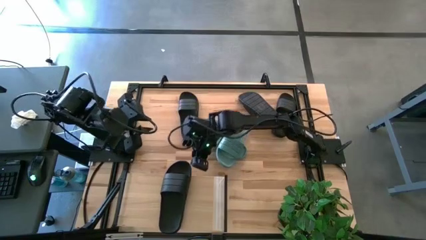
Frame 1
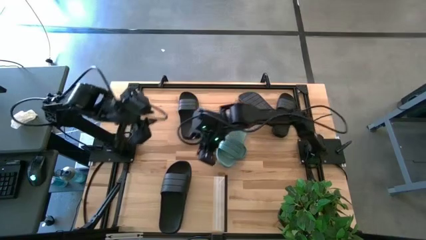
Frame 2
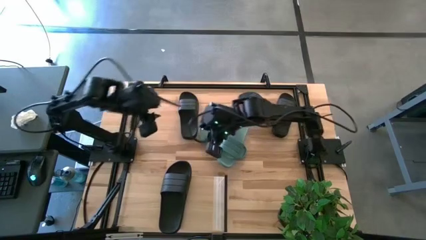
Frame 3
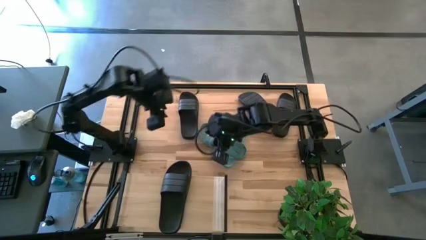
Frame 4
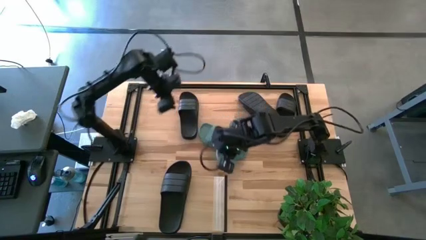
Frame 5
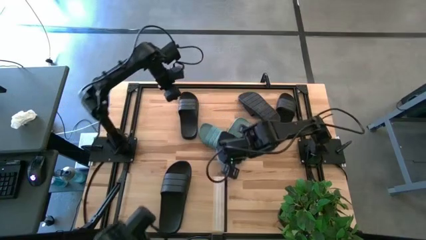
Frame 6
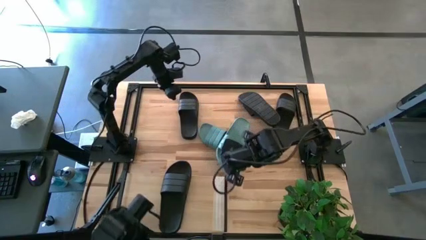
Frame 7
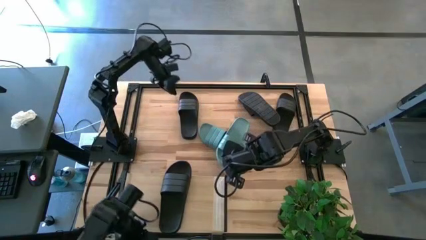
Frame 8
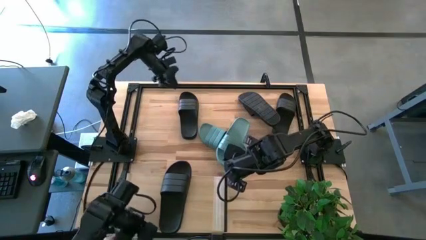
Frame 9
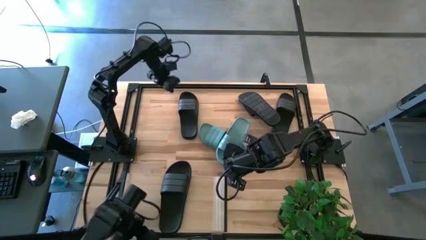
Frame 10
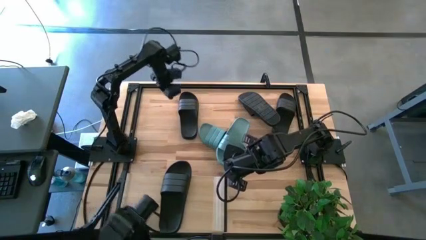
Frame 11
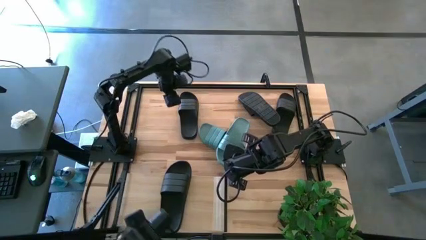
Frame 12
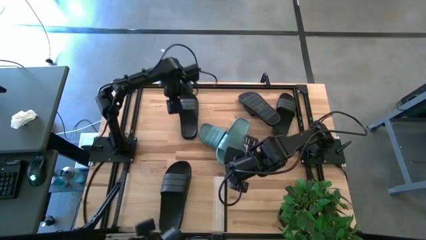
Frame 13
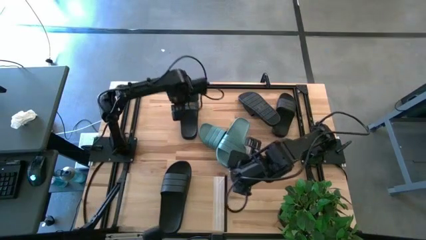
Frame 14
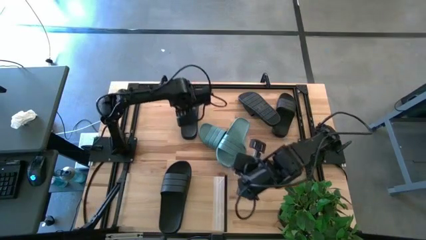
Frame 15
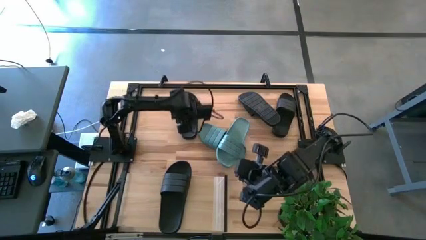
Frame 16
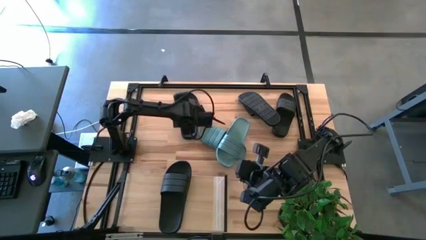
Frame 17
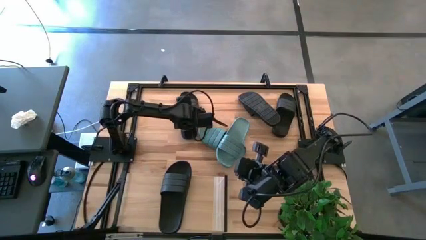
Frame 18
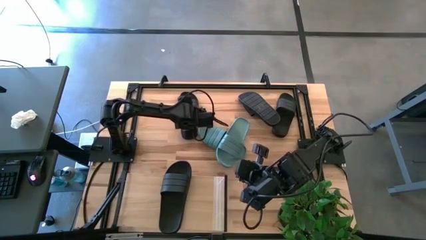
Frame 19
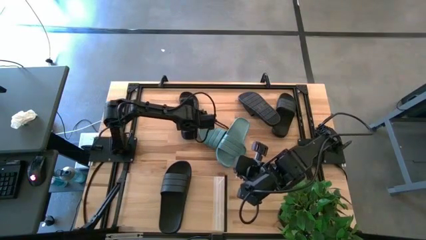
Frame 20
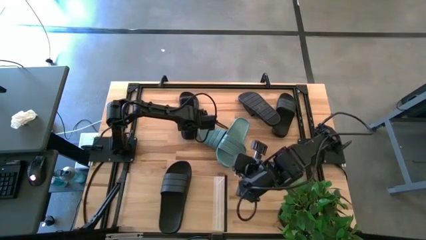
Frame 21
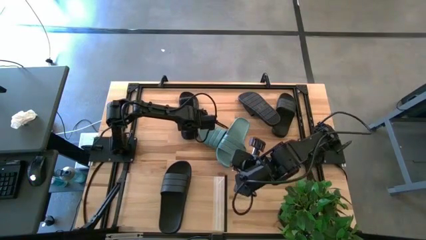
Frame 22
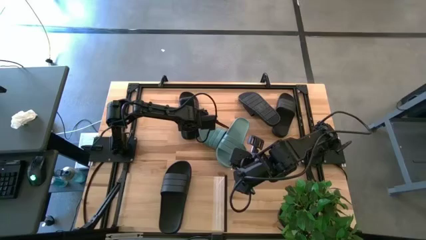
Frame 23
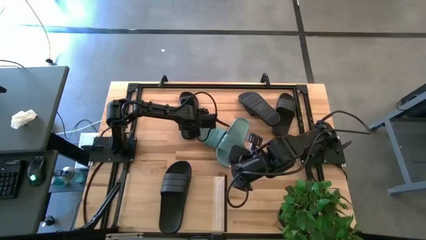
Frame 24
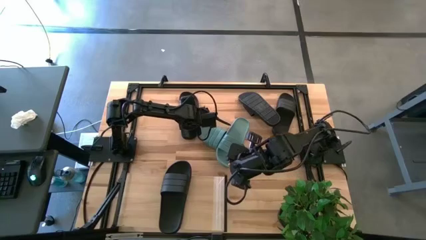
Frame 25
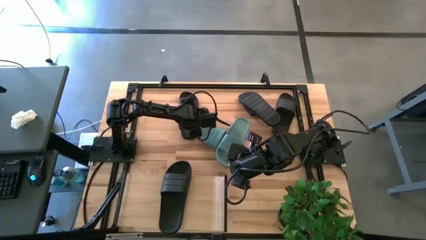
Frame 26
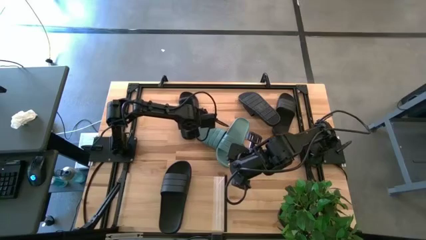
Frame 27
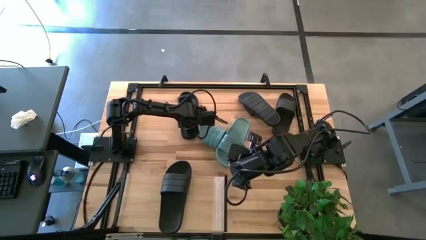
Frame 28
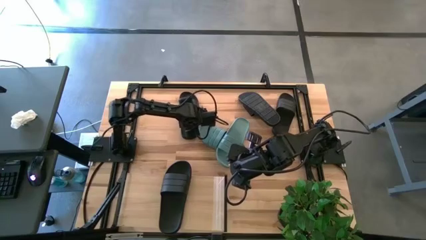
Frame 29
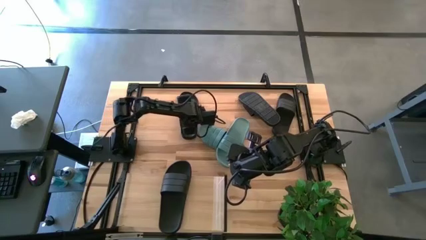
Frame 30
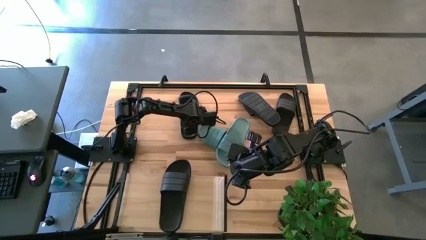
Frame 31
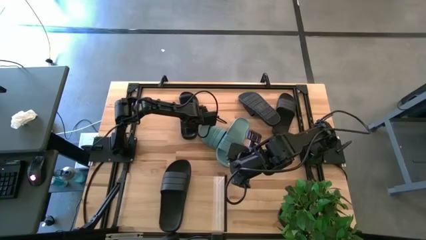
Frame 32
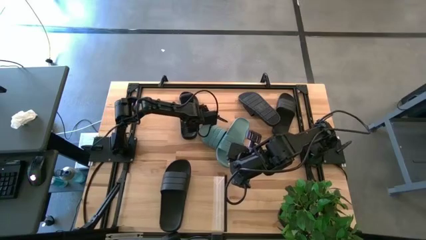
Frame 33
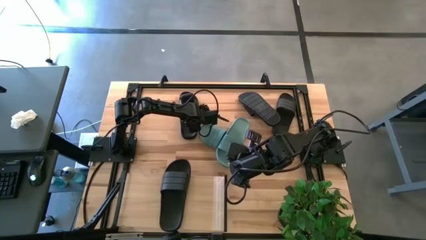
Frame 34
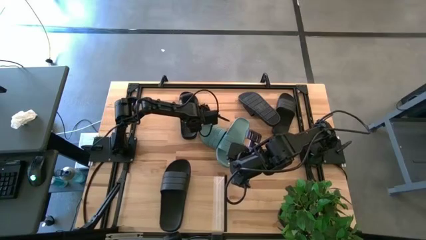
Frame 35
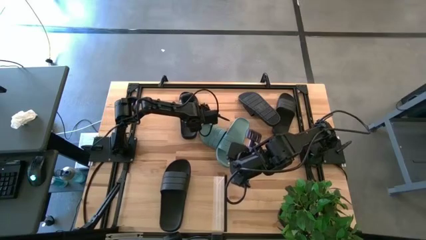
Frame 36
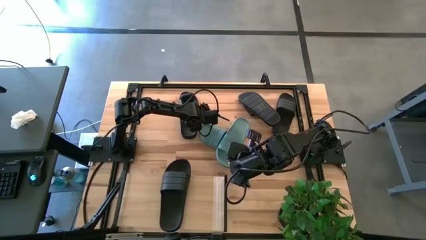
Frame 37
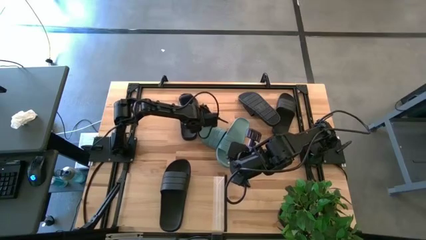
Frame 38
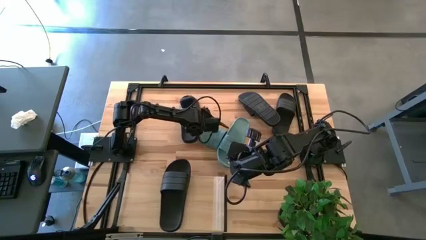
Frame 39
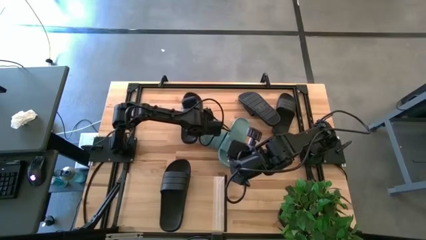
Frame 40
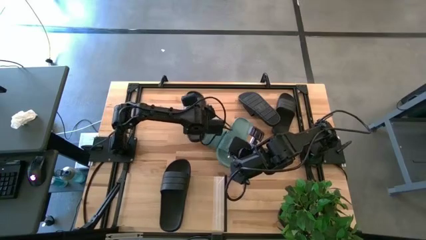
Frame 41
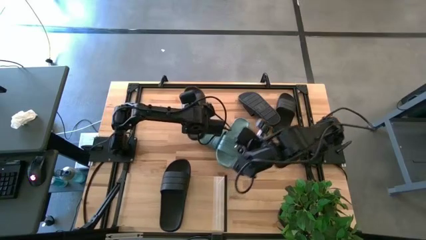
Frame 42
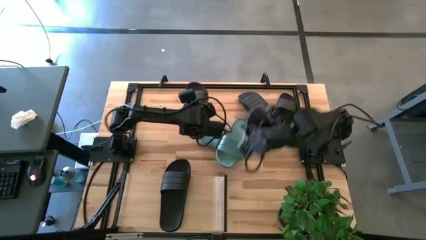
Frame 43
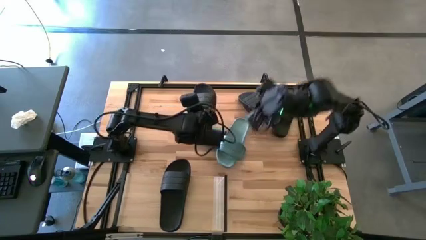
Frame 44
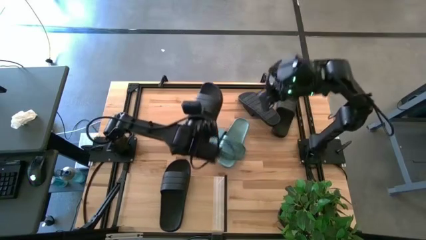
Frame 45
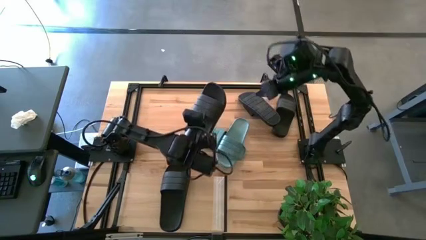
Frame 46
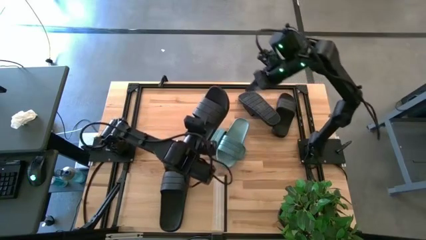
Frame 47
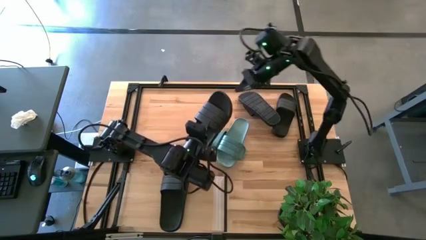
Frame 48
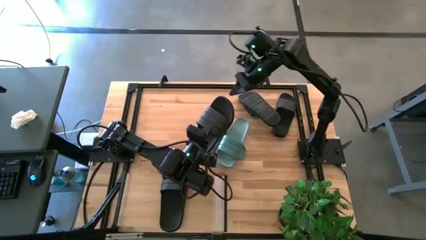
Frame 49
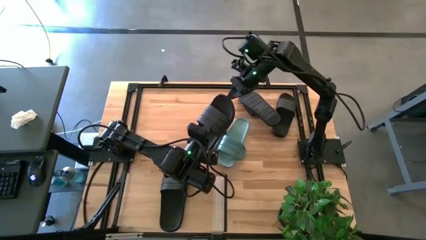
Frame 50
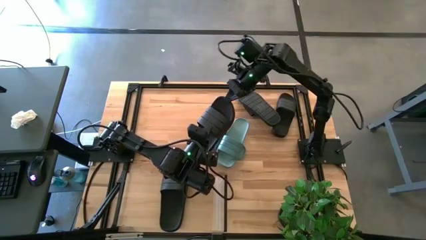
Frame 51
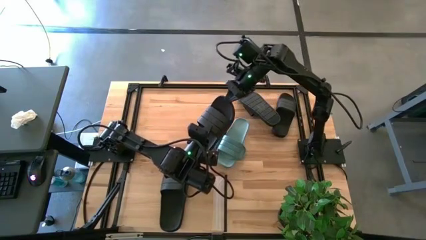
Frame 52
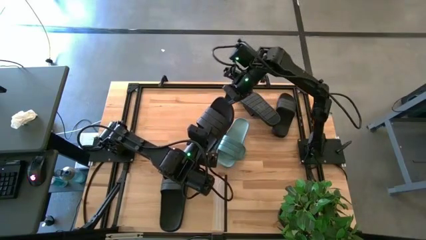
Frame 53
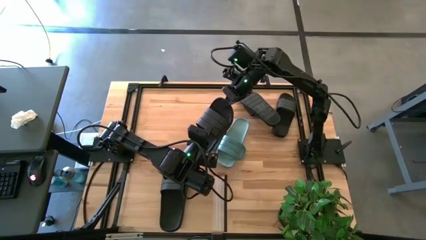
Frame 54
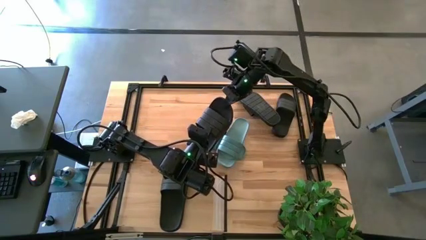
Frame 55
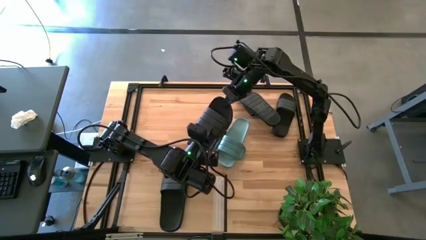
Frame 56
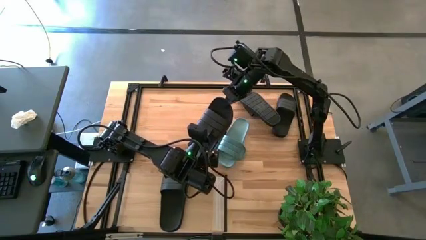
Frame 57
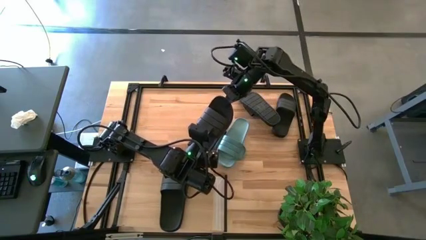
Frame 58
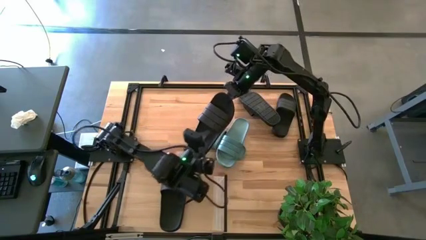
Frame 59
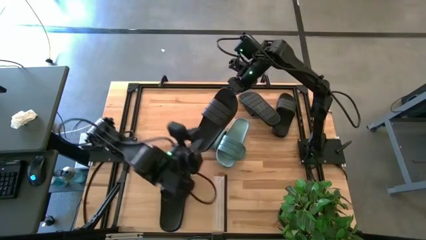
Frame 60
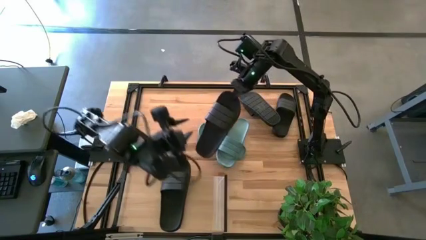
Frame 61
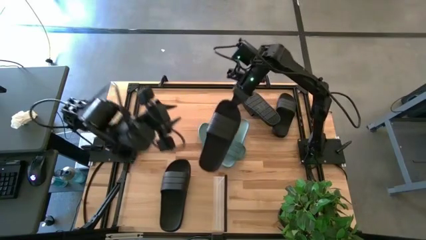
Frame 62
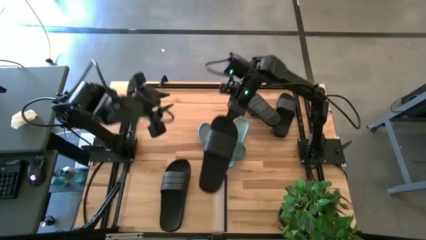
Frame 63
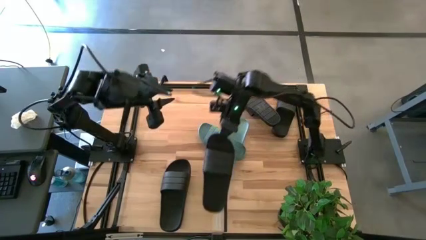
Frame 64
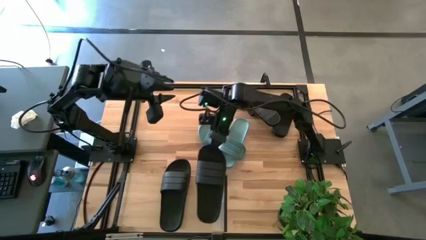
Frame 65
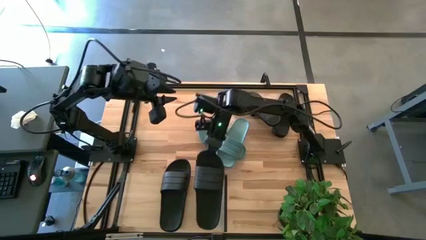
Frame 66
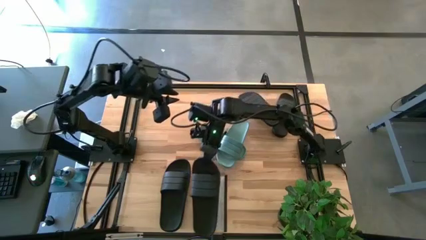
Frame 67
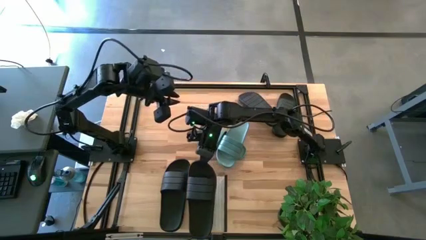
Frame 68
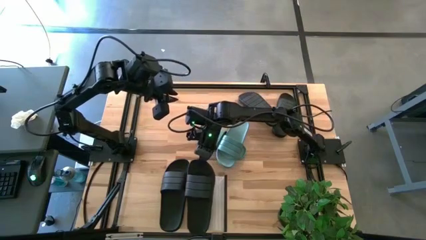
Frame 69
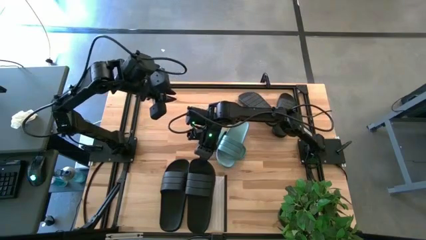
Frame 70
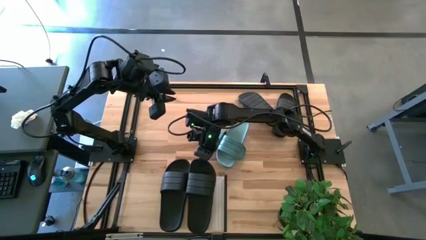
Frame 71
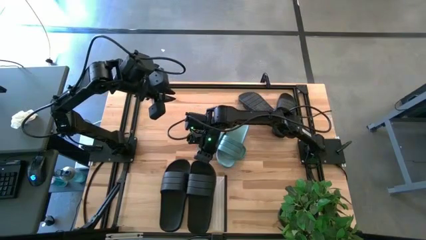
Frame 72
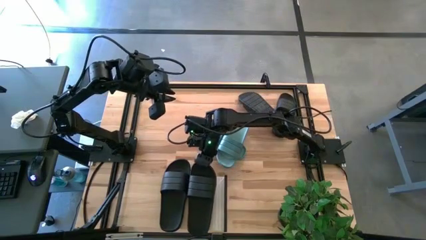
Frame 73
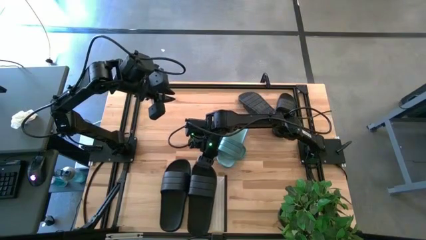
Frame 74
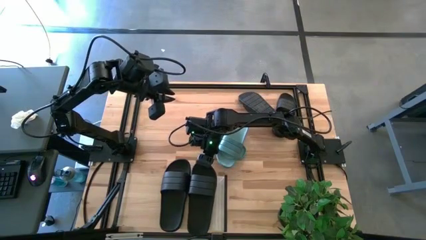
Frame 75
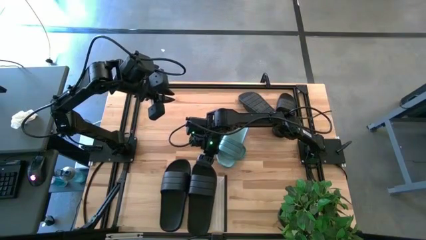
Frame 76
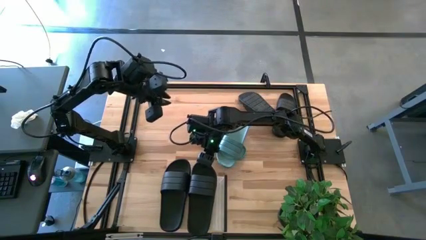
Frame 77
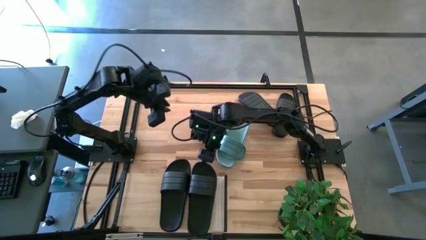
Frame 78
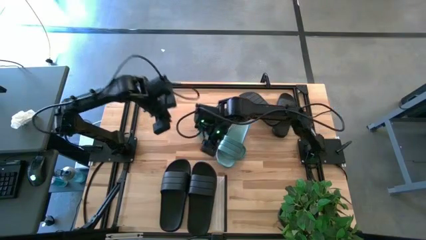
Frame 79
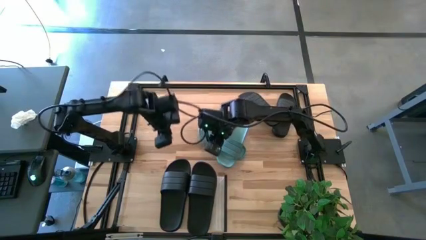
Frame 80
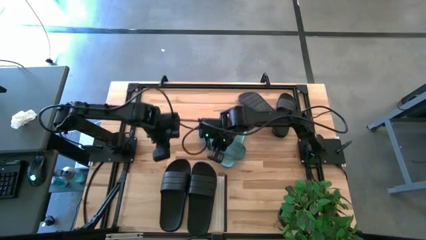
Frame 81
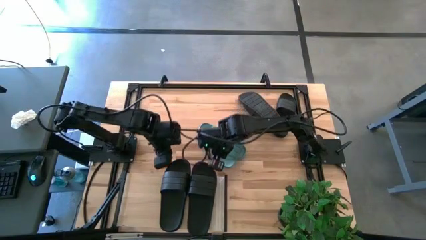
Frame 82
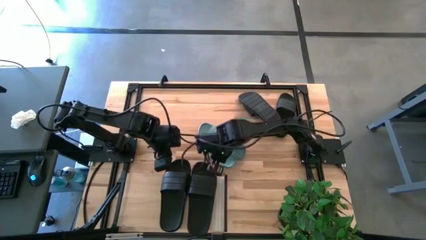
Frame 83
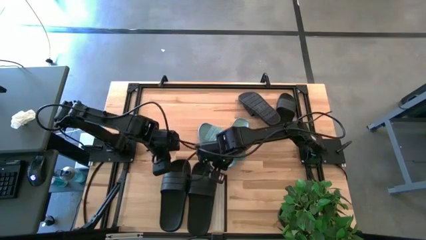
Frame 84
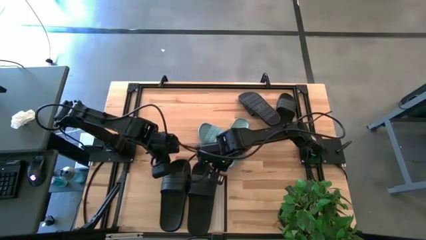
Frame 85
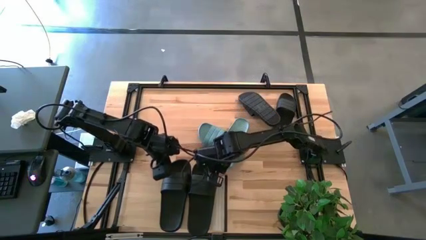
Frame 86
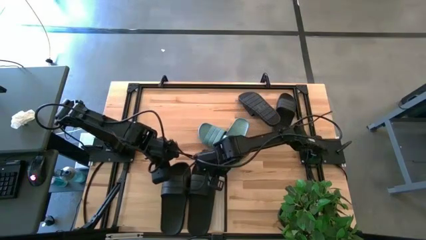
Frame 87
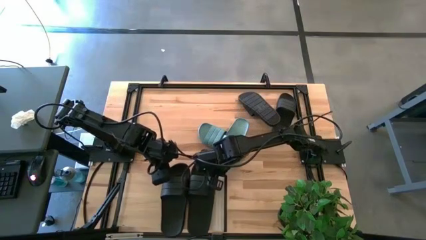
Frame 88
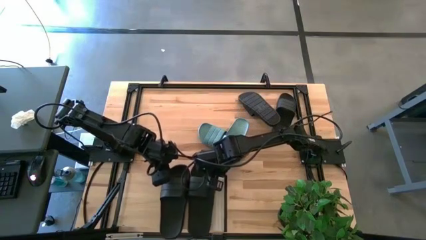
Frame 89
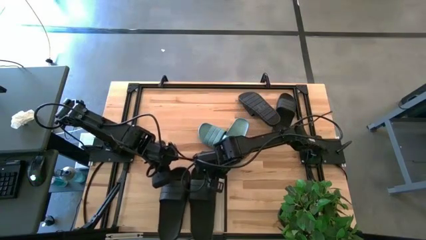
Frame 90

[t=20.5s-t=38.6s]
Task: Pick and place slides into the shelf
Put the pair black slipper on the shelf
